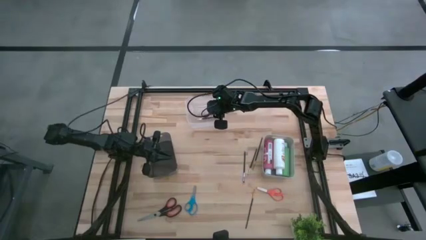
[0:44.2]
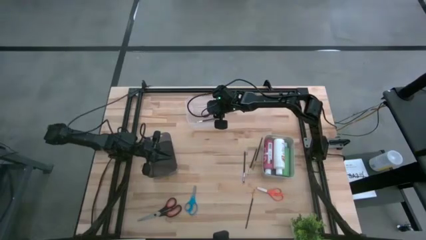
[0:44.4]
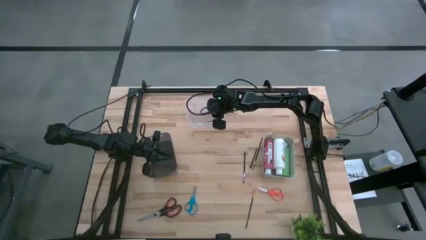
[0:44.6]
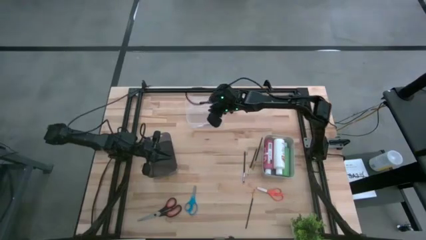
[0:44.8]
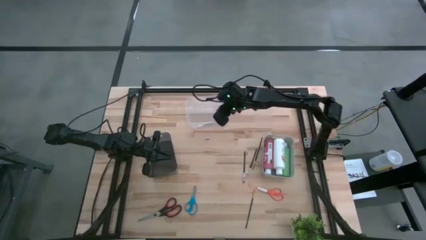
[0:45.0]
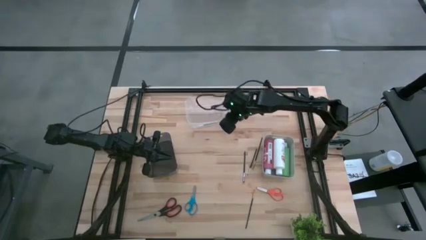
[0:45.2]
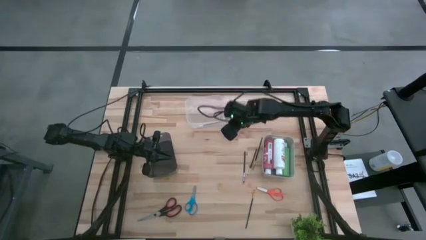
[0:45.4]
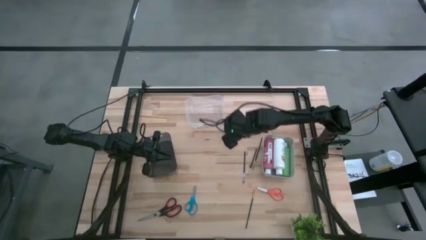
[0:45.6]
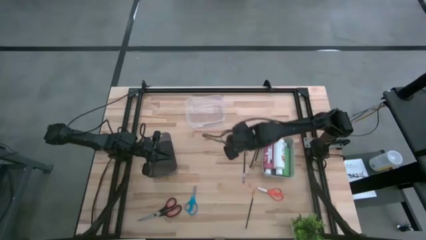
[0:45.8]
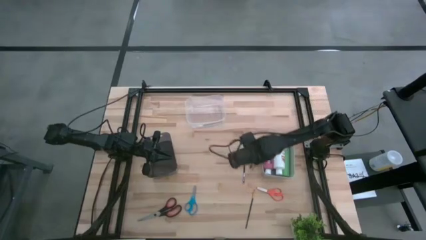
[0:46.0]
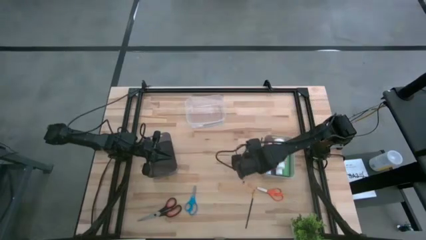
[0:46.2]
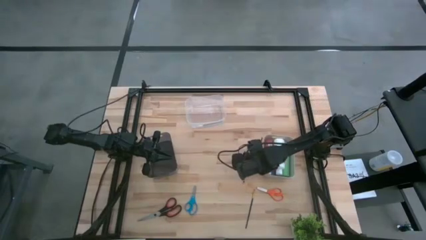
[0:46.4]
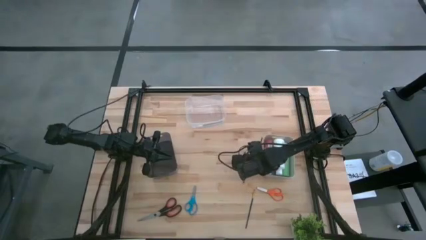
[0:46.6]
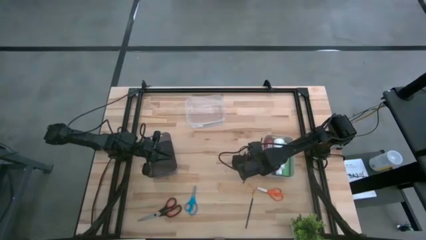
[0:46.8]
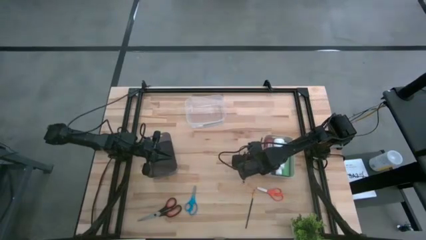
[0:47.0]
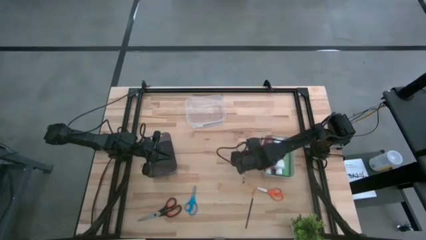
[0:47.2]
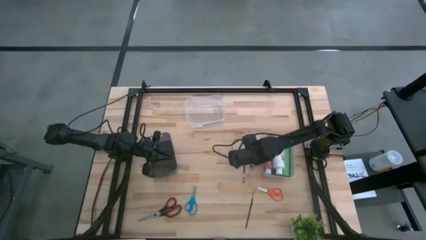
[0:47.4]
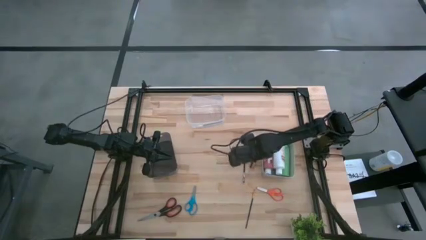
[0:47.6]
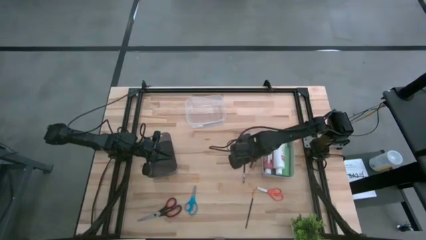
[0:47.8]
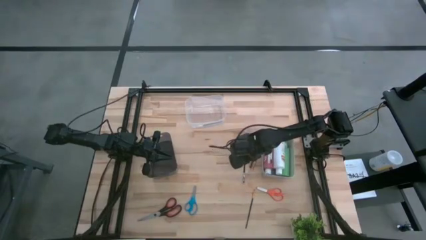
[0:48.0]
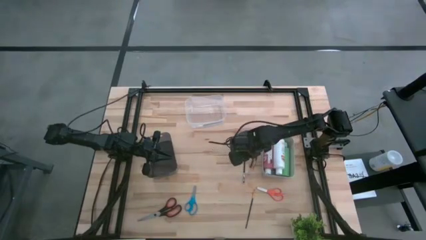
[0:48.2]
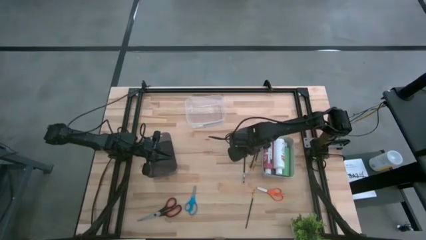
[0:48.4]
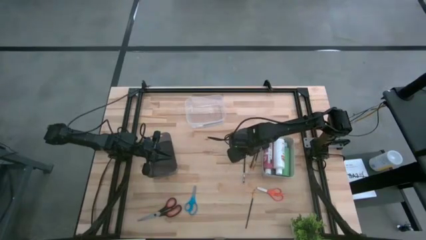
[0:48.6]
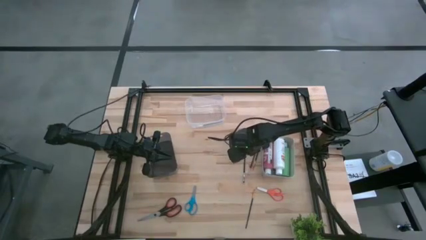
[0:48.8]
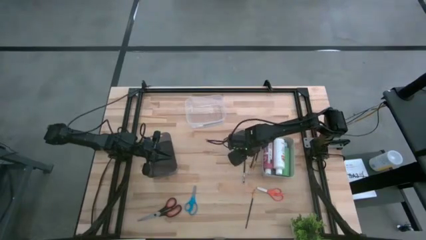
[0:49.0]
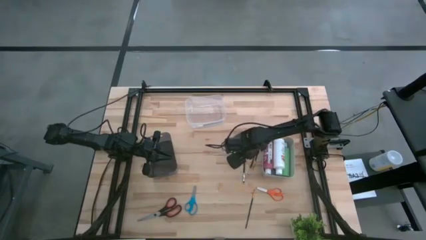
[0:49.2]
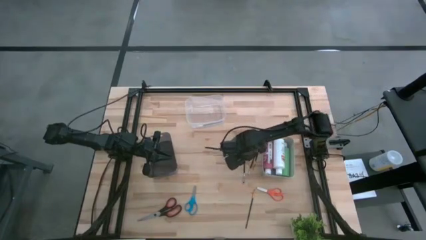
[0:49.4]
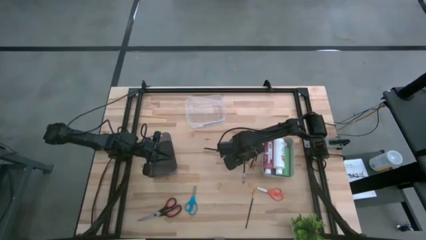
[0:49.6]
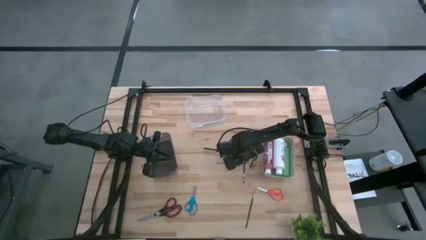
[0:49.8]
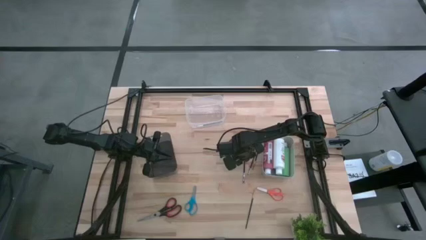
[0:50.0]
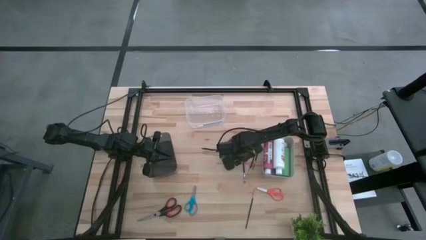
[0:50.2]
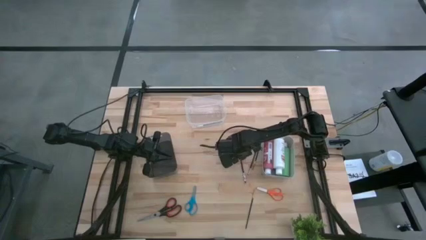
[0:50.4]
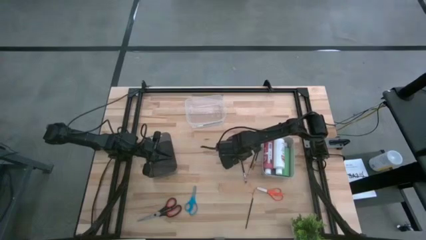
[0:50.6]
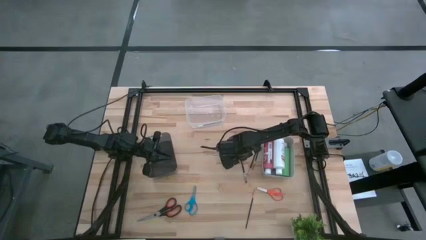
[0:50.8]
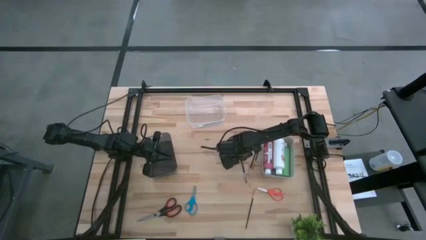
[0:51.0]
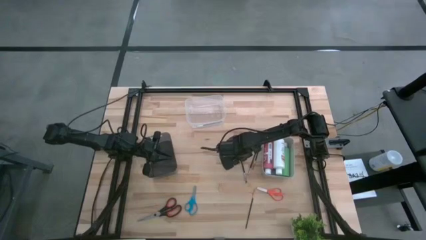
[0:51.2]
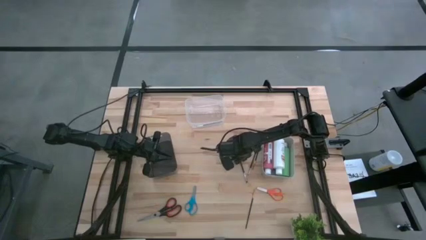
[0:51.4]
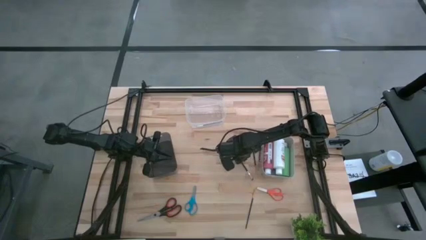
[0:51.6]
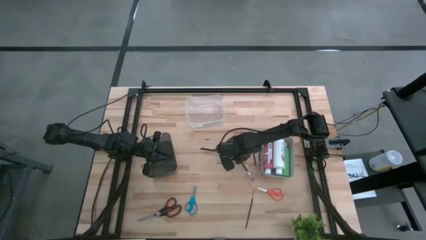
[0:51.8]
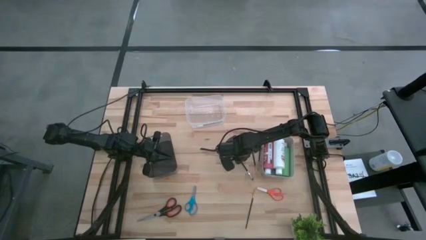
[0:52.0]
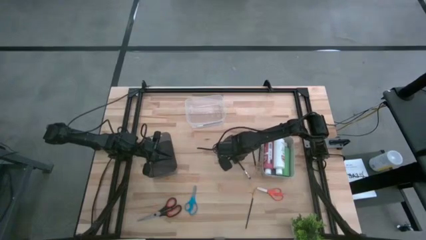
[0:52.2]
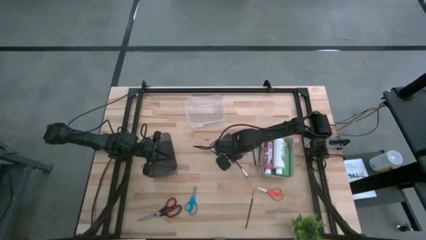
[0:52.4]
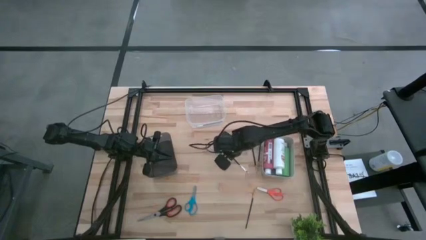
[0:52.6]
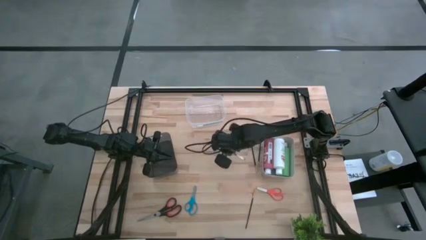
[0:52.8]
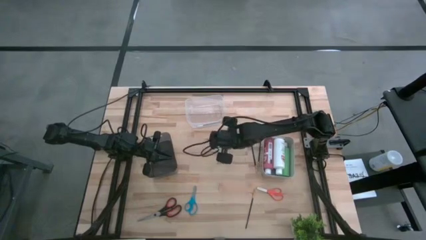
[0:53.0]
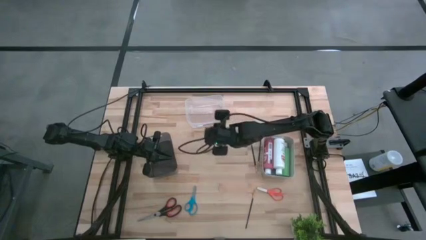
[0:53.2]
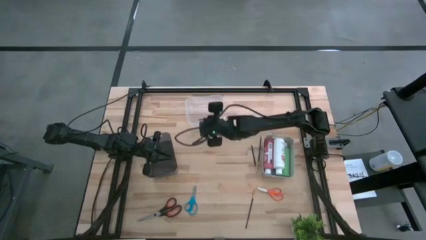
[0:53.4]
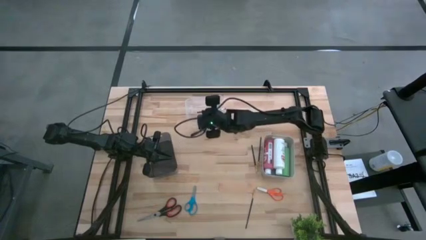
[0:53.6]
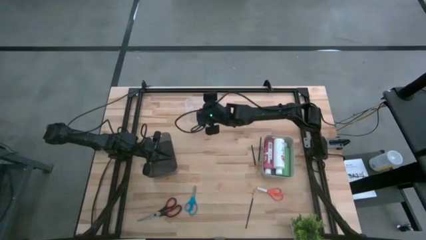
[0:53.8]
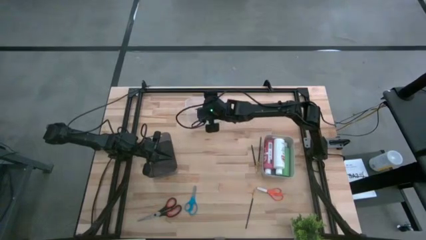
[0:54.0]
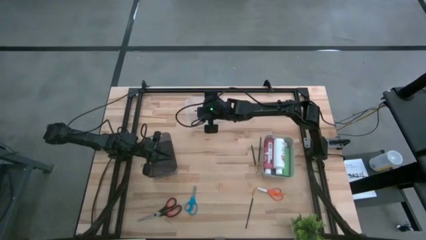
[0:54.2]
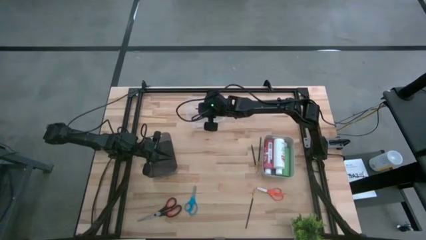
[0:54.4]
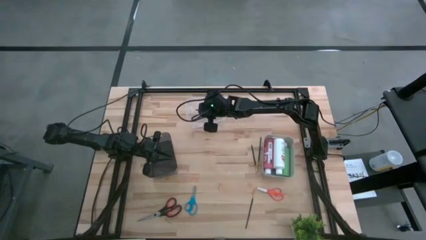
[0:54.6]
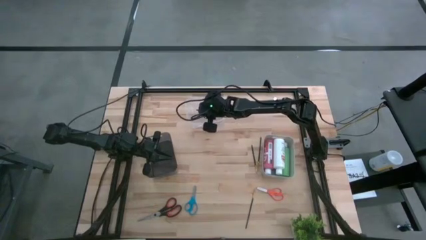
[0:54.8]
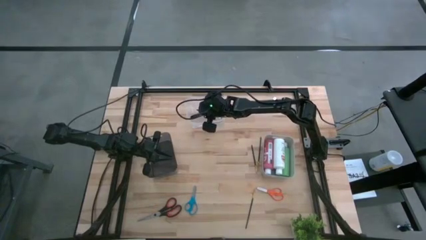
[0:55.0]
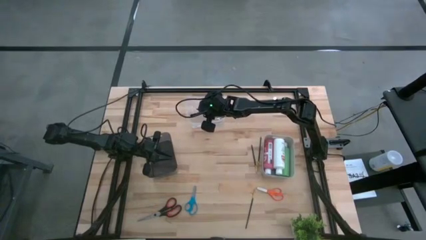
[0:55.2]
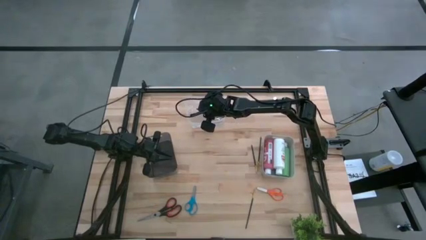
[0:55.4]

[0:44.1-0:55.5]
Task: Pick & Place Paint Supplies
Put the silver paint brush into the transparent bin

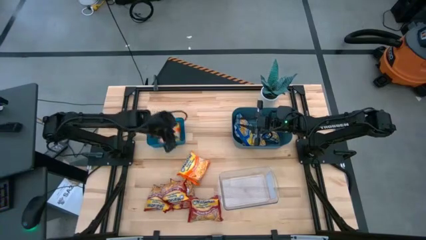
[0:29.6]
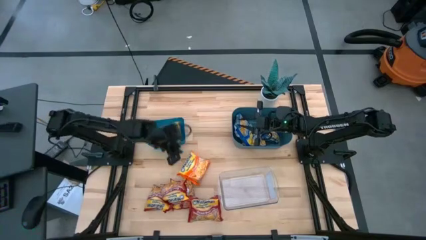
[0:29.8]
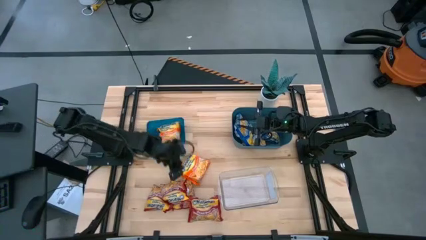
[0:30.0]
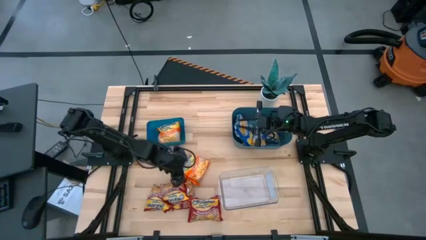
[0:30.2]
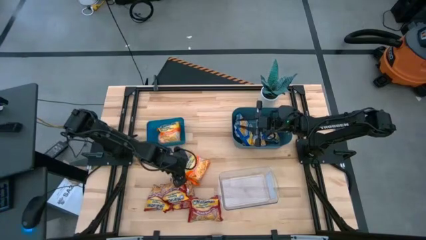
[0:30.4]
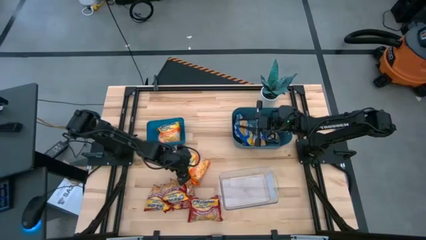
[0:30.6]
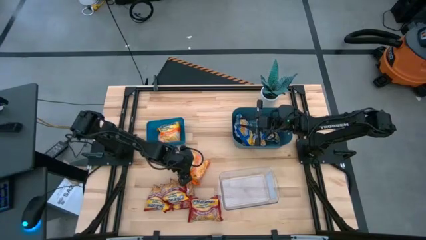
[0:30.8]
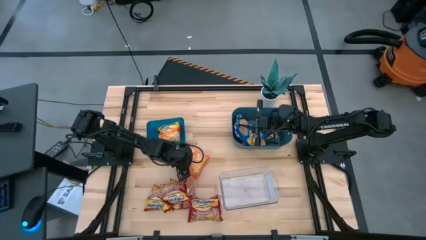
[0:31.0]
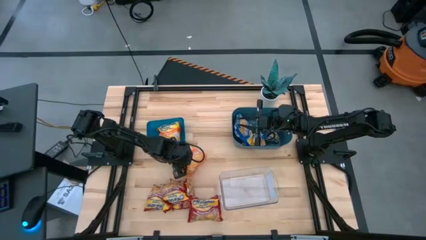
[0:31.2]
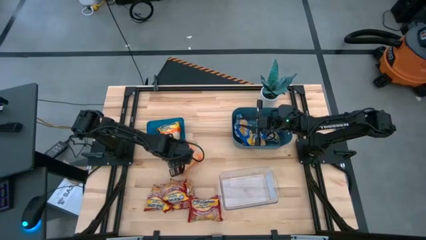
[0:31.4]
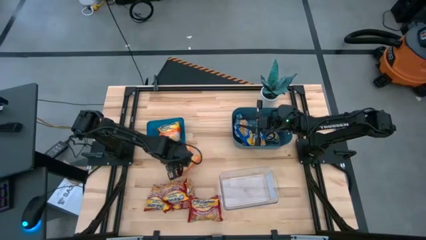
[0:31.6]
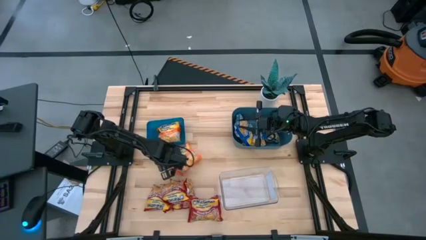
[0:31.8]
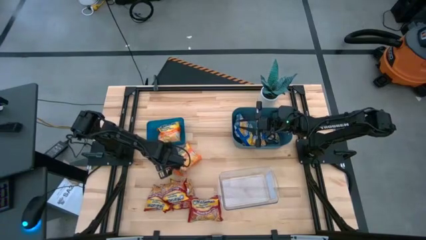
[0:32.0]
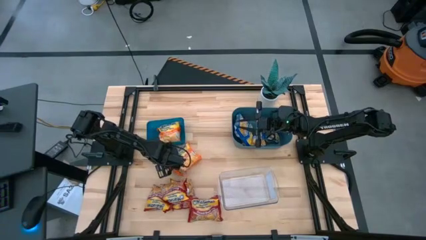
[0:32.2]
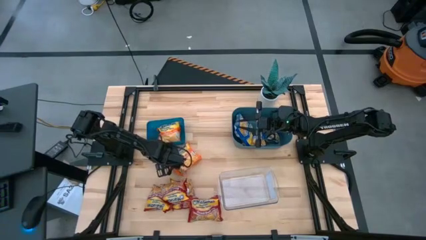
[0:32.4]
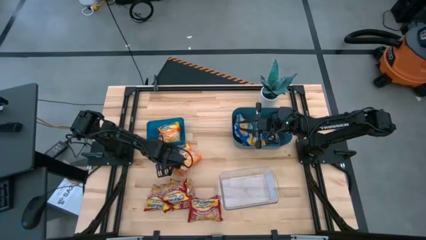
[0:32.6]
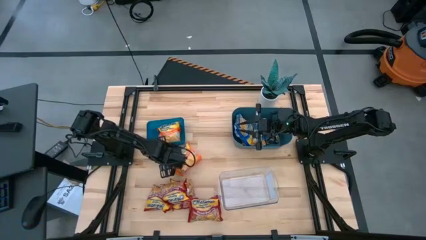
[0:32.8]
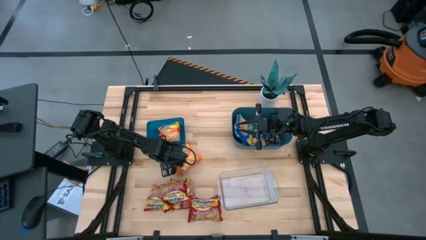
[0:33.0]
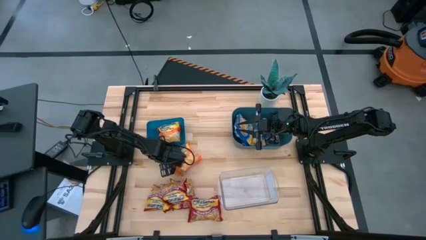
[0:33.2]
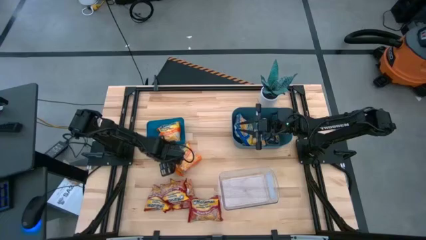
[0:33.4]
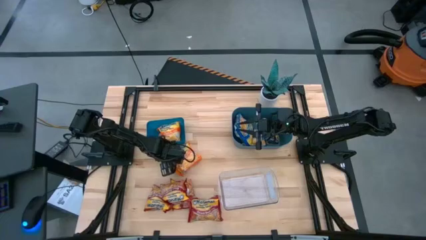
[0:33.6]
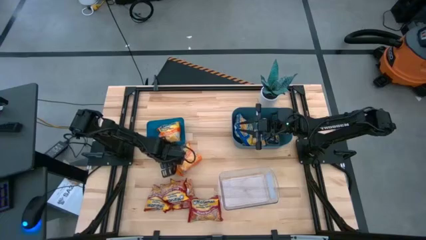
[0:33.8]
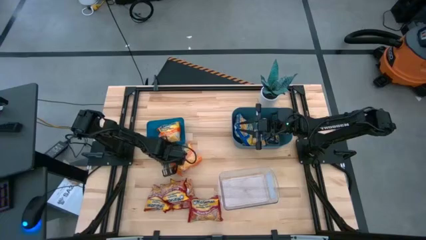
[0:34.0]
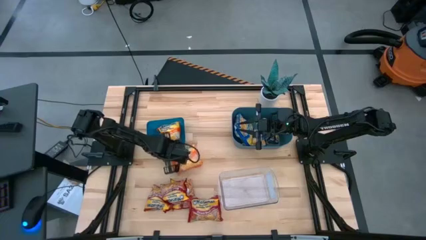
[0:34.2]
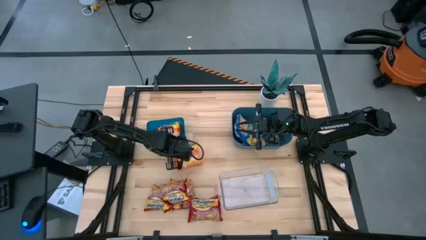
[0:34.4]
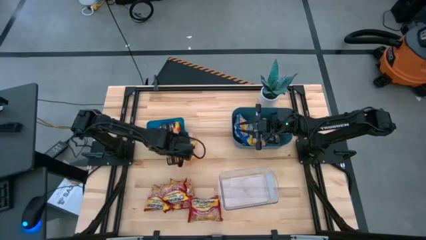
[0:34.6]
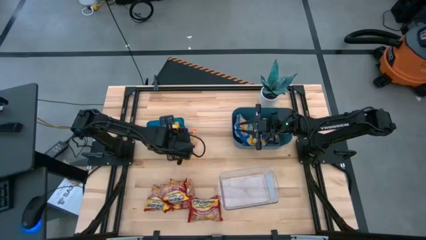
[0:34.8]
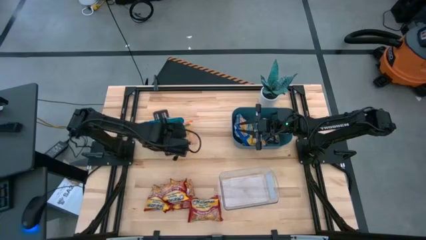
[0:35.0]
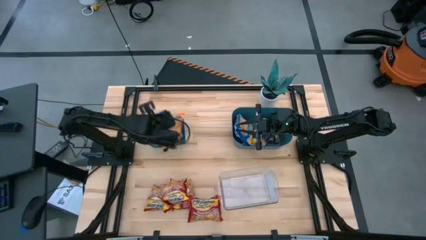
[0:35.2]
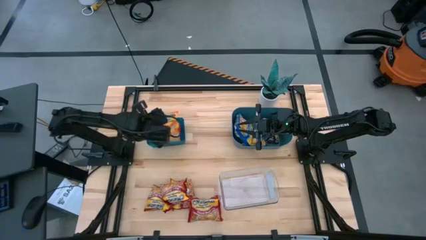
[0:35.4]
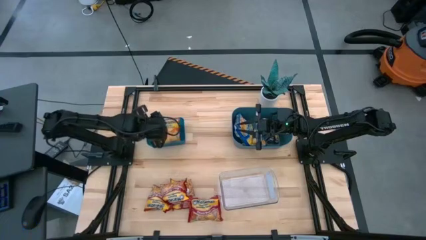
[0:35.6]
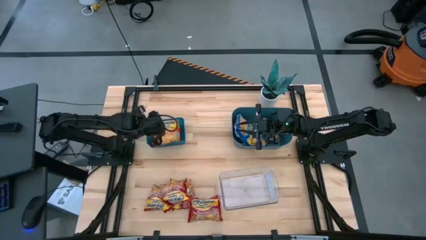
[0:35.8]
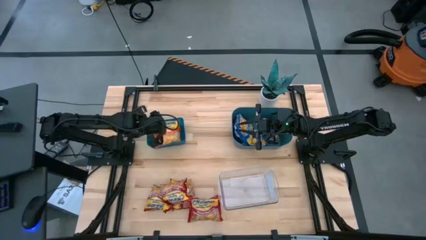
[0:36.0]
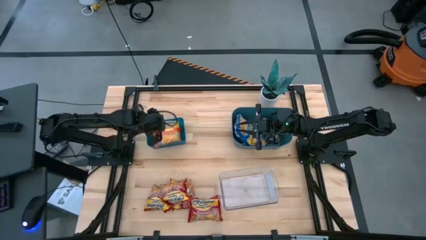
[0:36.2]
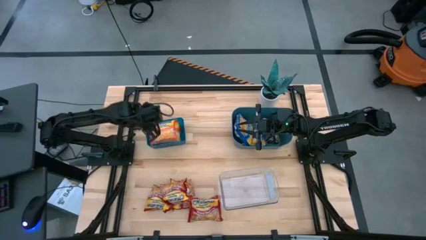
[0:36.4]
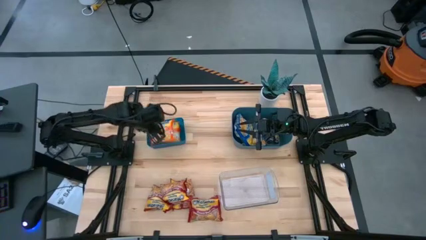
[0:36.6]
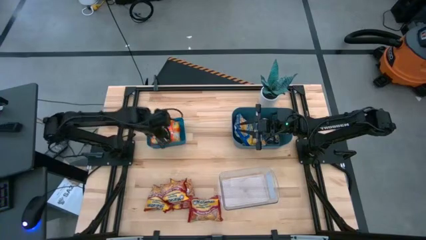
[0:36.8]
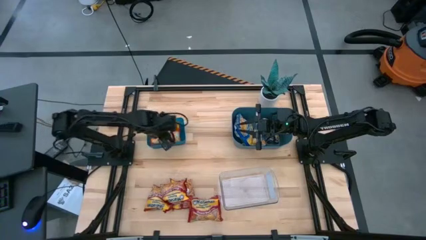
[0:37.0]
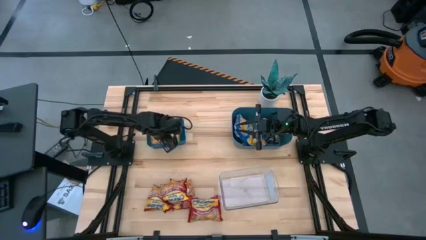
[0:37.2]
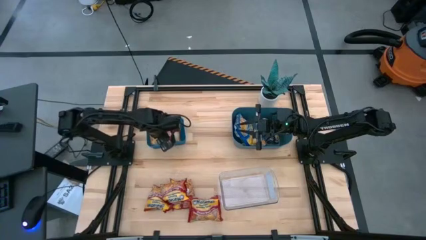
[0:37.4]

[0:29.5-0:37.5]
Task: Sort Maruchan noodles
Put the orange noodle pack into the blue bin
